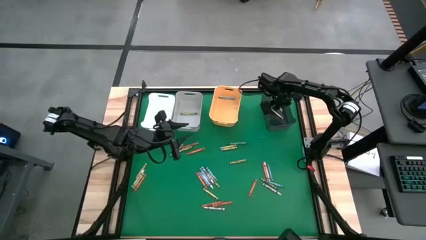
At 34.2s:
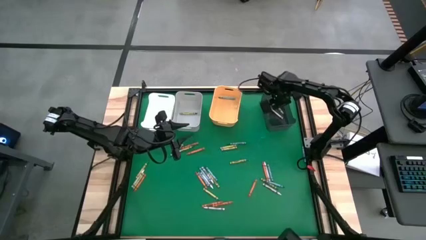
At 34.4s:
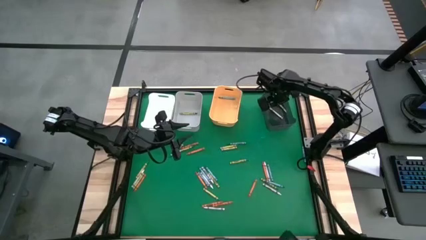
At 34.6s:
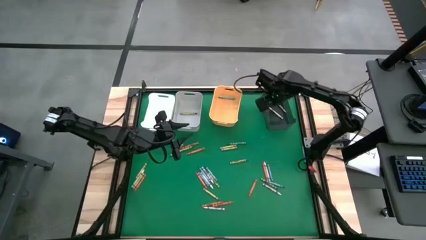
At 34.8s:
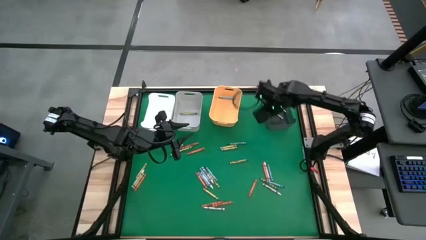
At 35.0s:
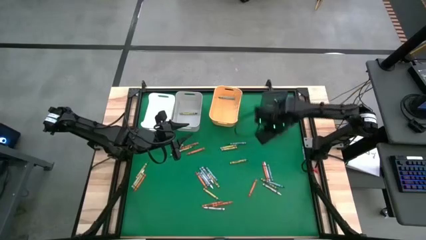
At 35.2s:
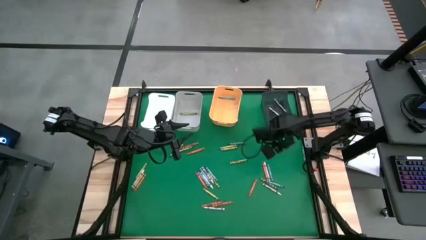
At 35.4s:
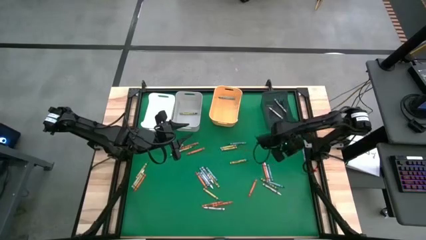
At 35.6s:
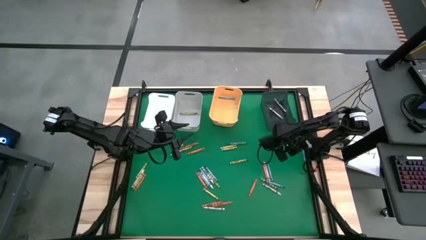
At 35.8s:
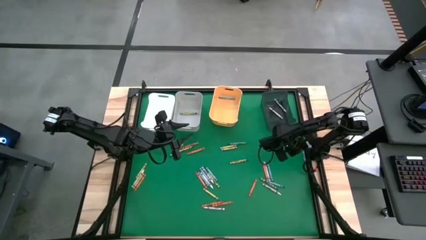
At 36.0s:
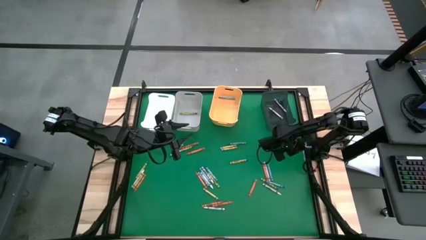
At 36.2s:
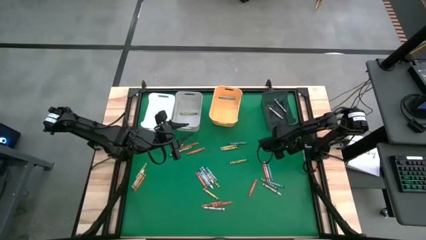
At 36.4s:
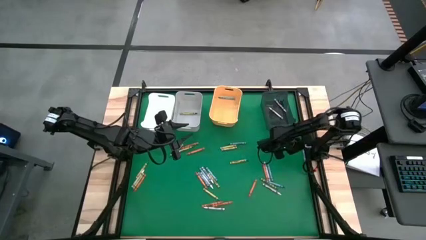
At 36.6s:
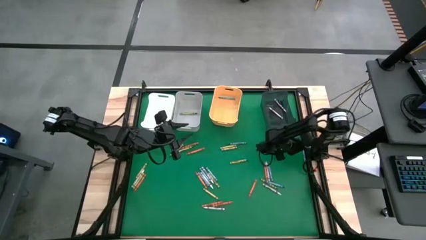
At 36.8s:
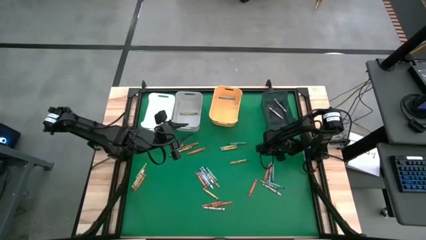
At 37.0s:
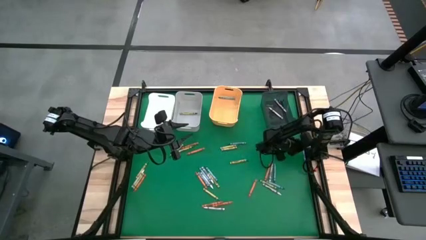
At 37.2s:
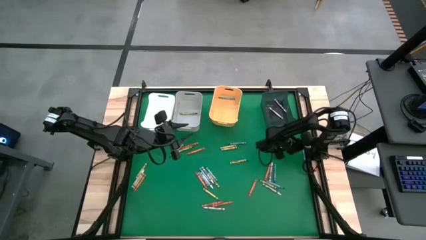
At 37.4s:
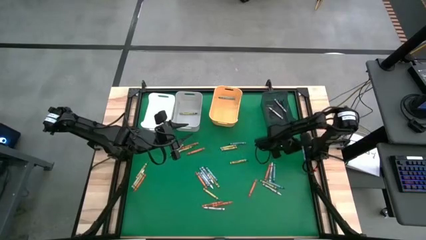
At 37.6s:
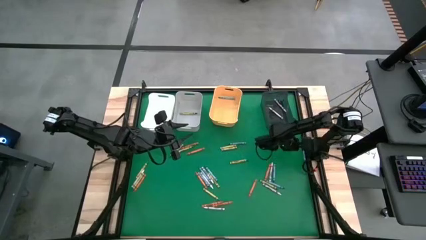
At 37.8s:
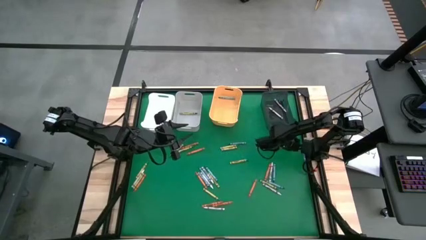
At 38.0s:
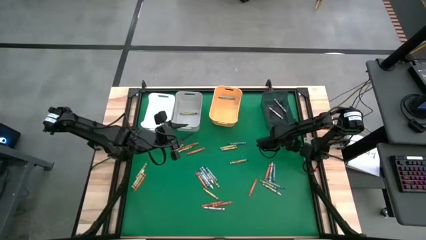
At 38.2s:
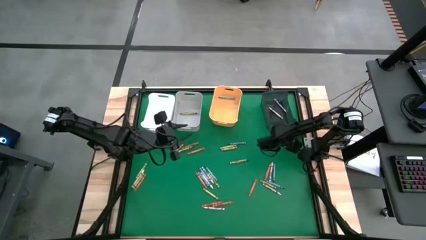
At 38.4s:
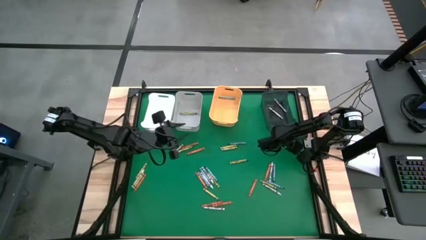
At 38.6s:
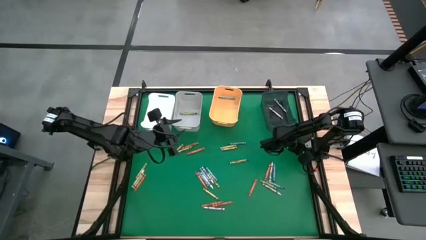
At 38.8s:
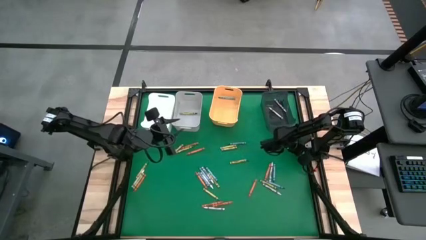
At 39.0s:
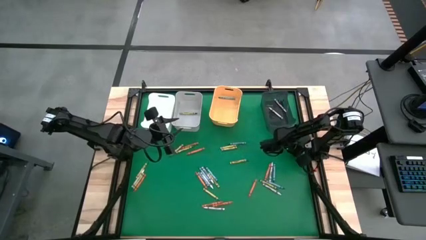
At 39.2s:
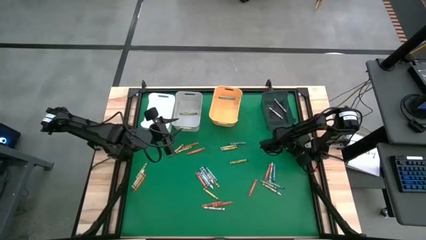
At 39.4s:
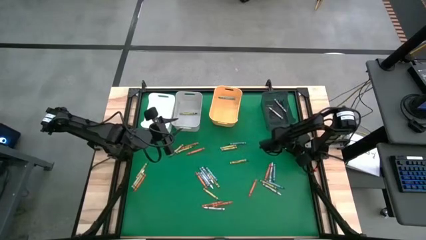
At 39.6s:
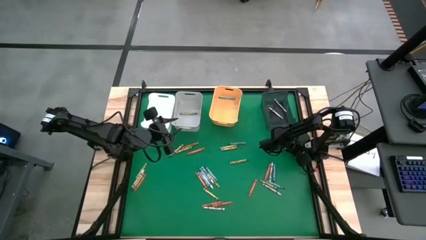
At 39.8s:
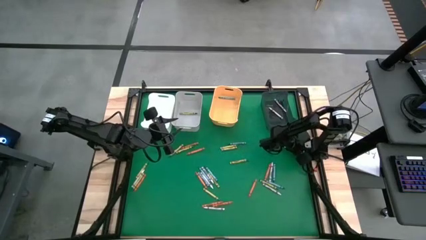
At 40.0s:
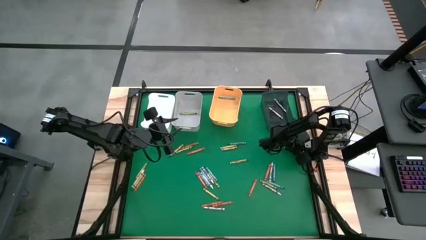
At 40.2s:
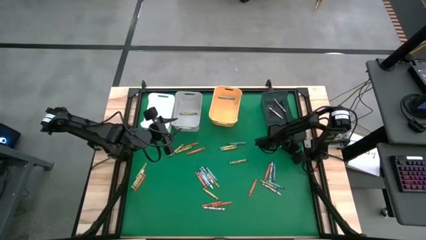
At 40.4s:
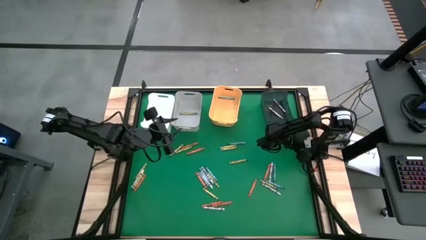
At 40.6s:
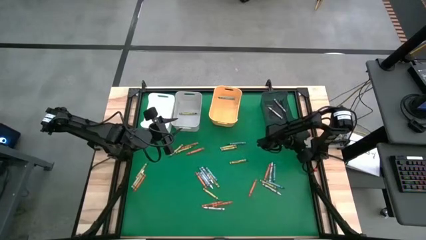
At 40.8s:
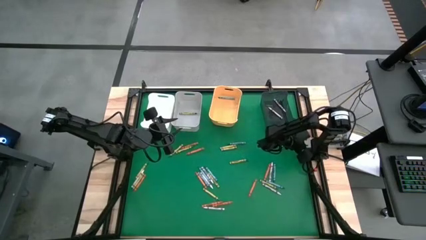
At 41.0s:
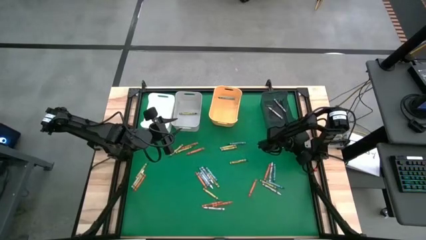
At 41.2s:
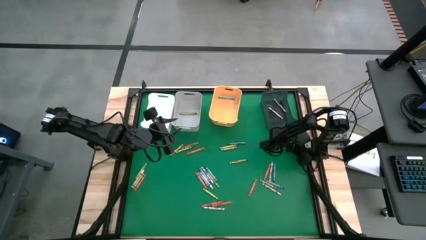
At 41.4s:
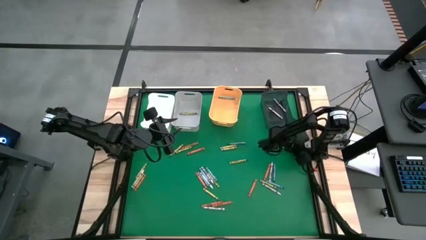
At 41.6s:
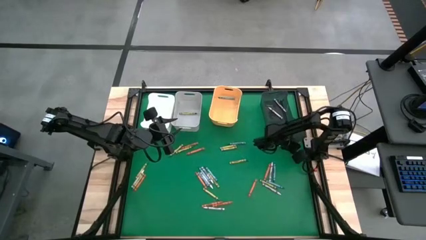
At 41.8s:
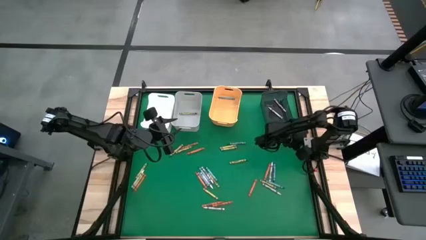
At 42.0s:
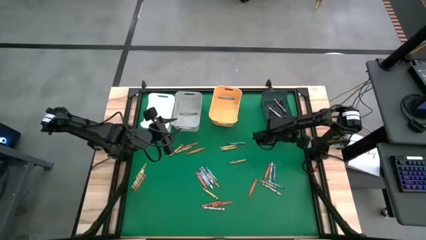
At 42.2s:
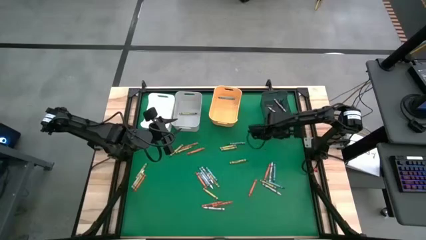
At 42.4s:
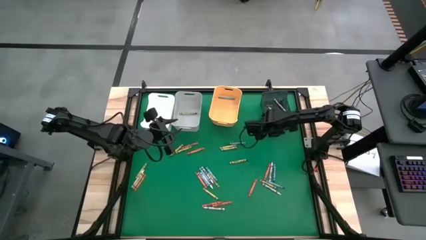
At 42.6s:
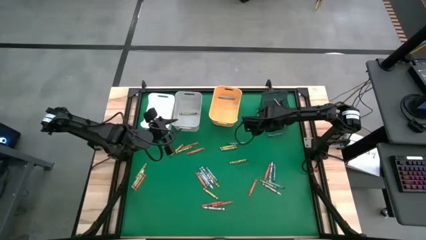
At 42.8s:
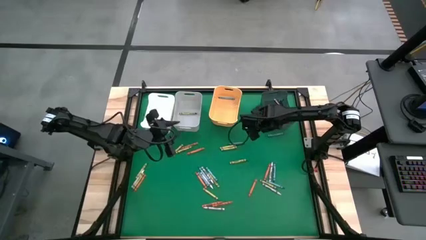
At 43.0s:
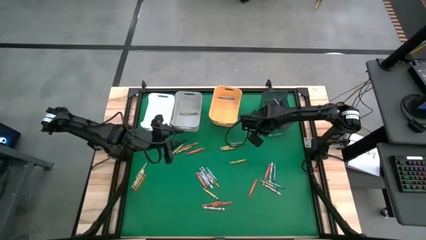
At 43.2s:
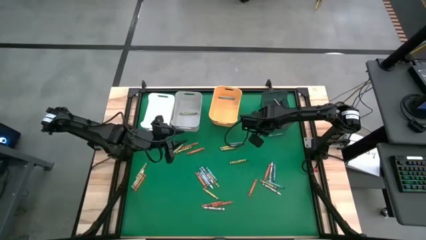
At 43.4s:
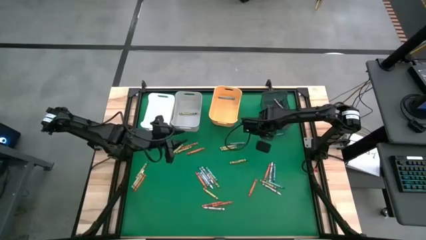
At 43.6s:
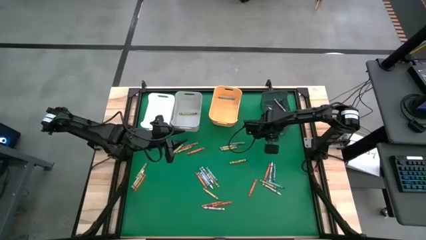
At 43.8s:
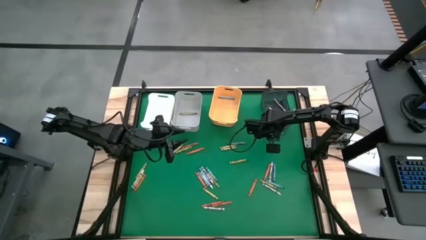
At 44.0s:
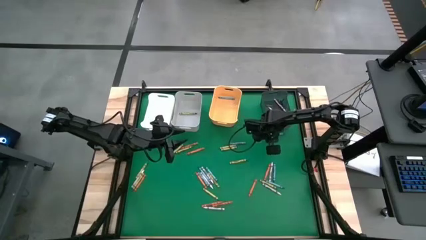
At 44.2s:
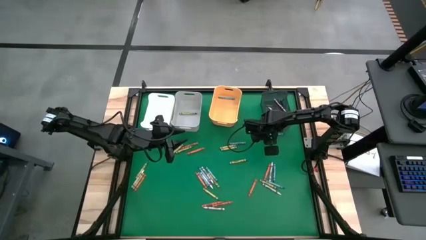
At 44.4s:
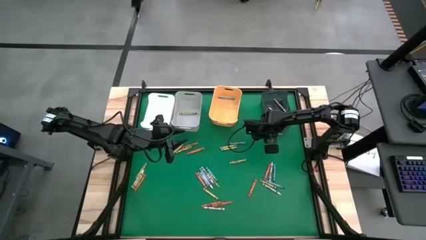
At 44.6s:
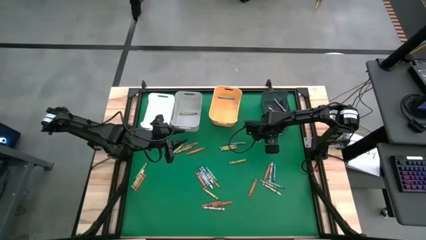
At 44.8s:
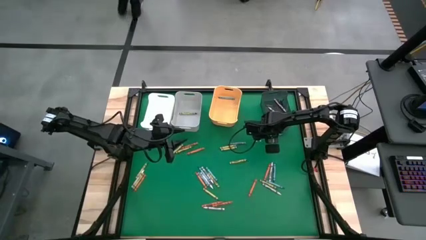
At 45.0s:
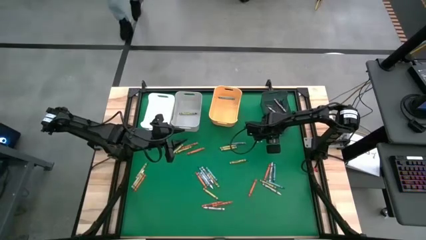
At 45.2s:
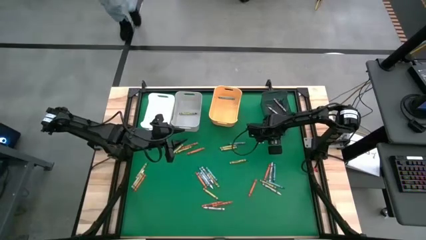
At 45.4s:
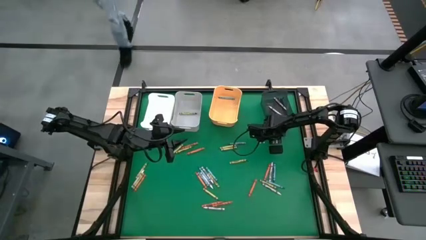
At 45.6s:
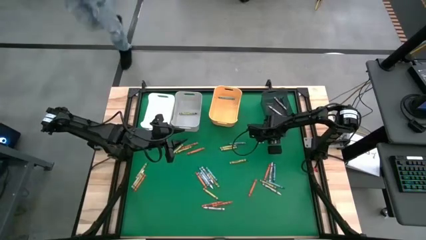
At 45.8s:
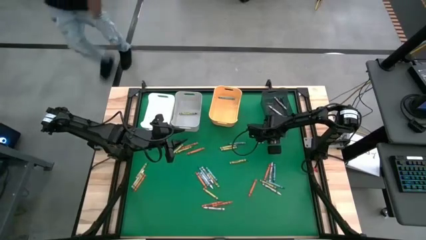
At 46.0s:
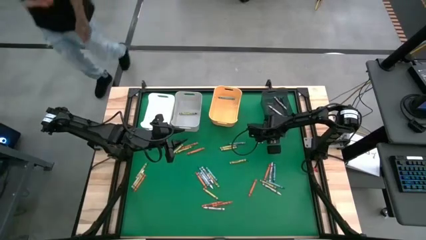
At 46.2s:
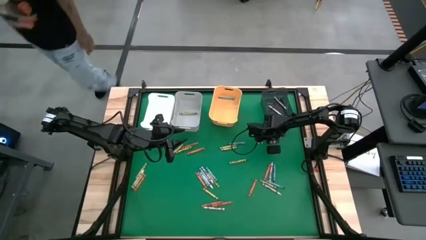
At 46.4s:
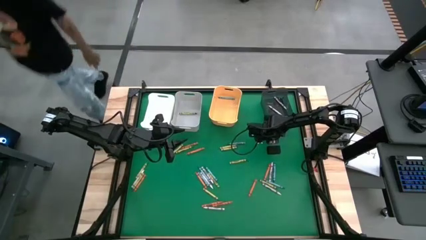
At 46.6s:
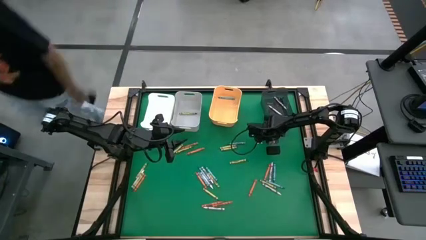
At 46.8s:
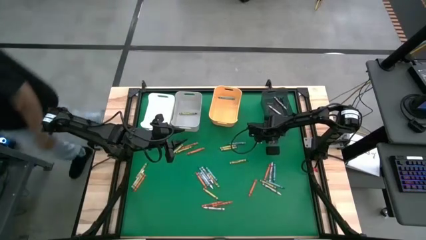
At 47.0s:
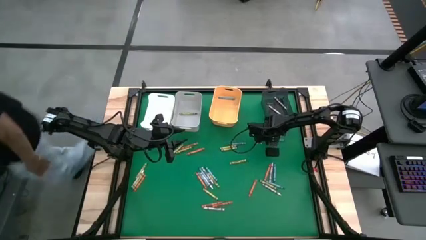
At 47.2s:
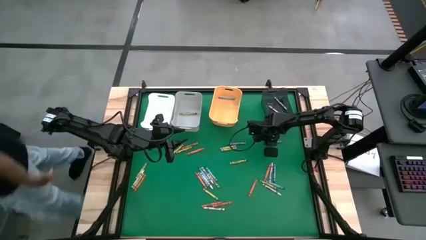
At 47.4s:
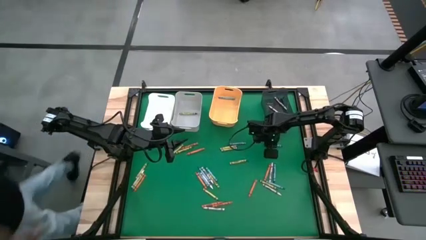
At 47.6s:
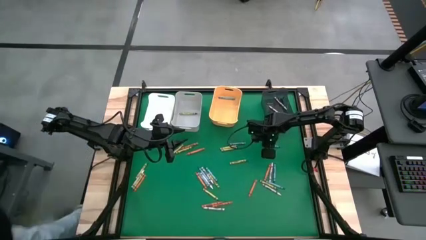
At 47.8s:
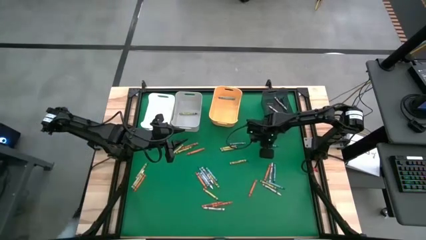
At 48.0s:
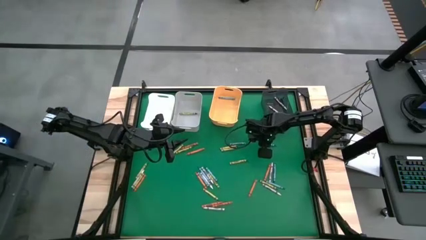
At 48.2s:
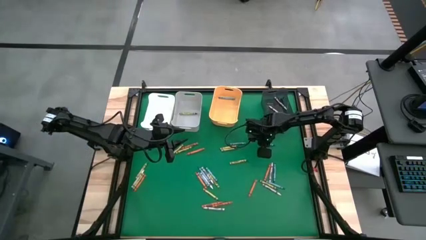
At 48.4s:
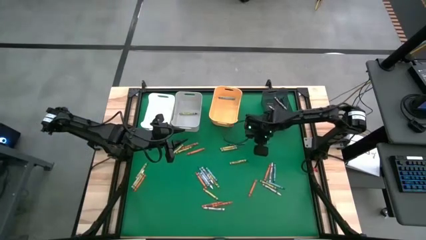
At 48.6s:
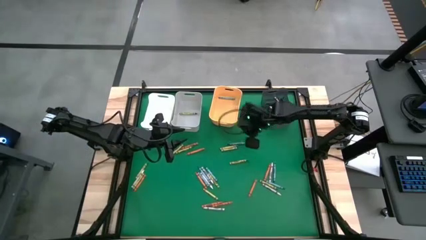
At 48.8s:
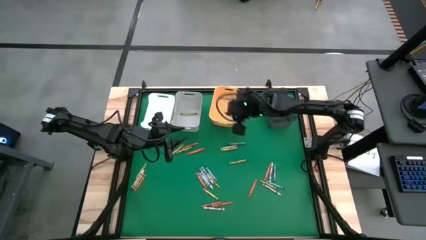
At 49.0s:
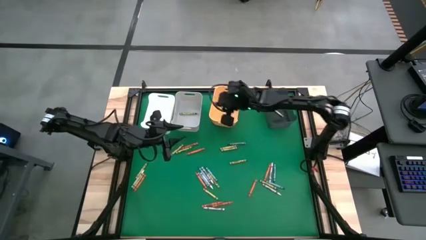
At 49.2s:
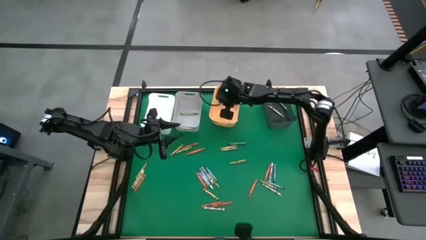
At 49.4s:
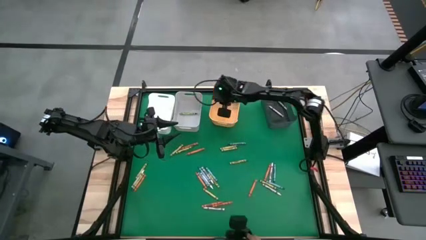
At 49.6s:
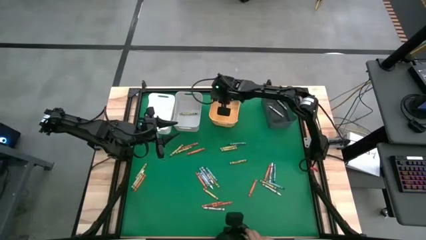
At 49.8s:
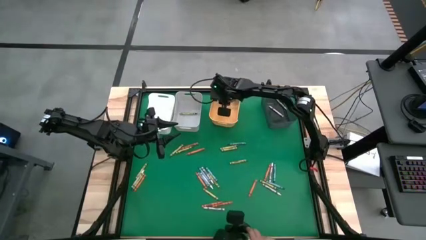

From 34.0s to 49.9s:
Task: Sort crayons
Put the blue crayon into the yellow bin
